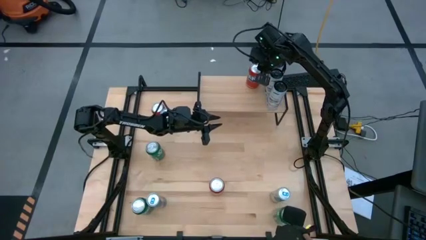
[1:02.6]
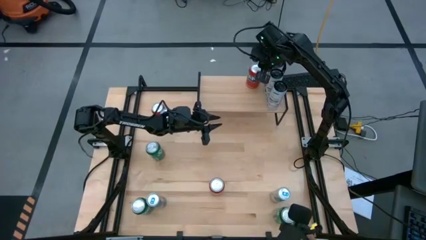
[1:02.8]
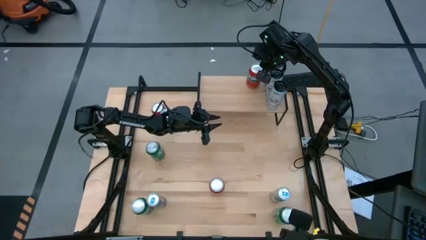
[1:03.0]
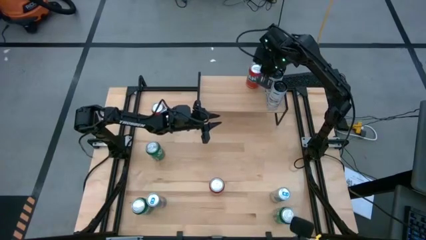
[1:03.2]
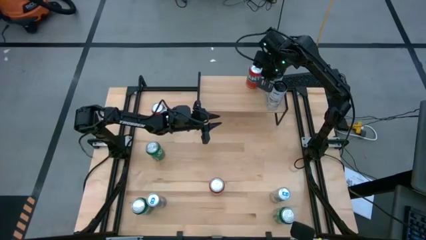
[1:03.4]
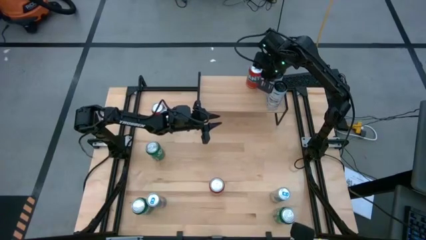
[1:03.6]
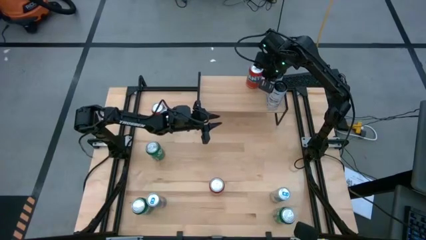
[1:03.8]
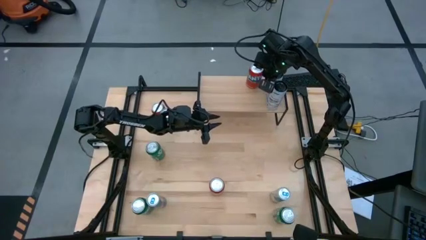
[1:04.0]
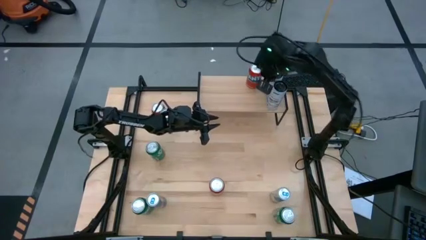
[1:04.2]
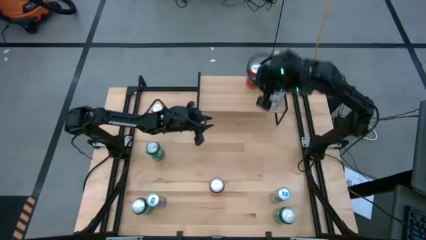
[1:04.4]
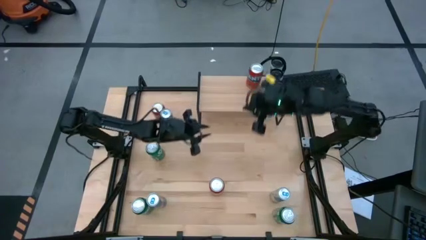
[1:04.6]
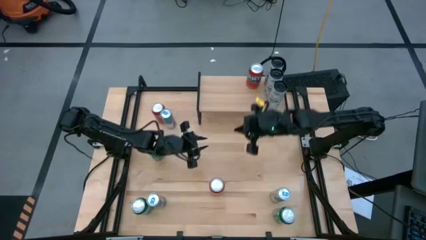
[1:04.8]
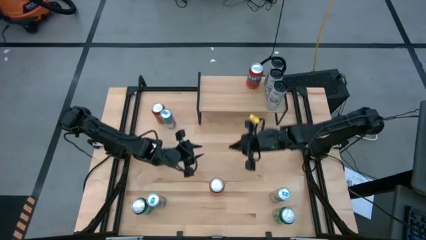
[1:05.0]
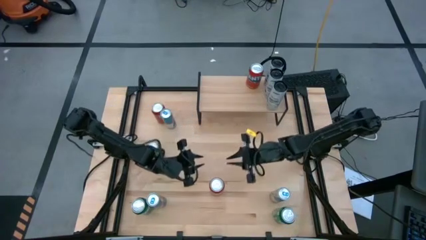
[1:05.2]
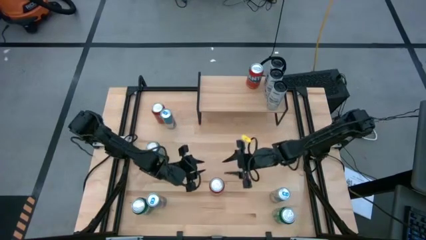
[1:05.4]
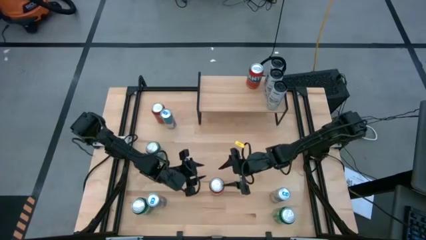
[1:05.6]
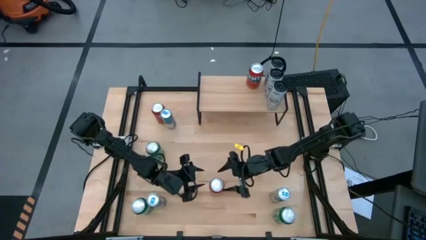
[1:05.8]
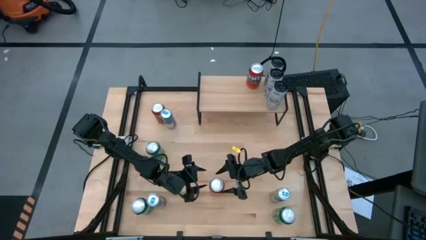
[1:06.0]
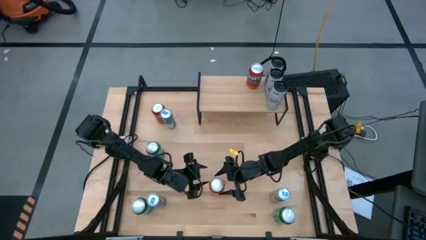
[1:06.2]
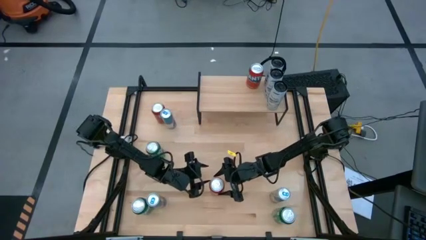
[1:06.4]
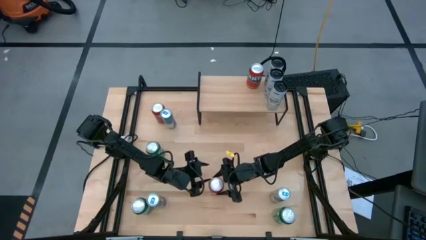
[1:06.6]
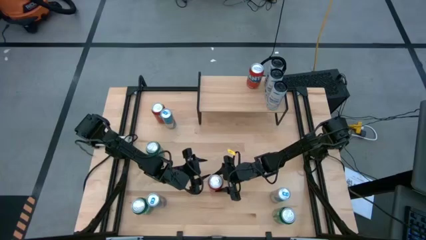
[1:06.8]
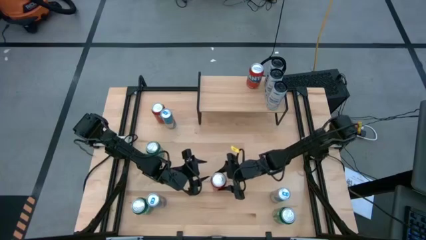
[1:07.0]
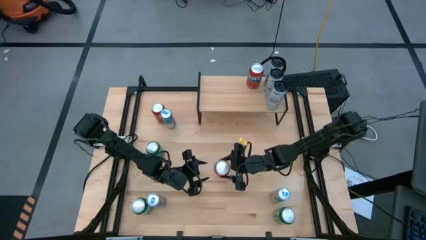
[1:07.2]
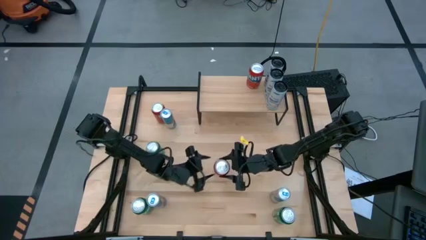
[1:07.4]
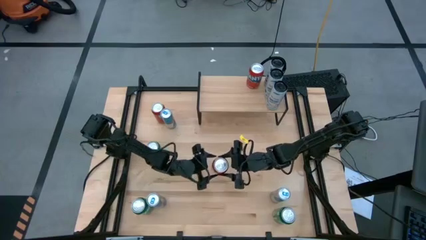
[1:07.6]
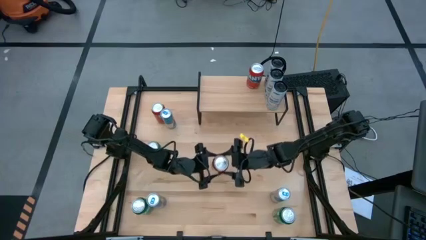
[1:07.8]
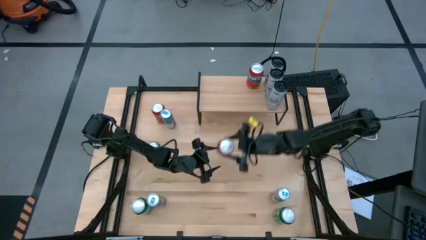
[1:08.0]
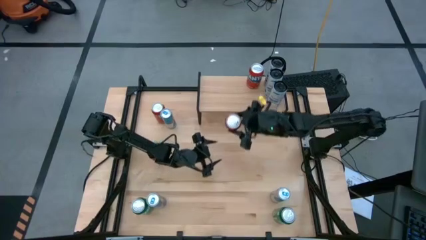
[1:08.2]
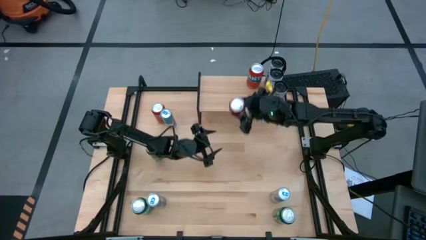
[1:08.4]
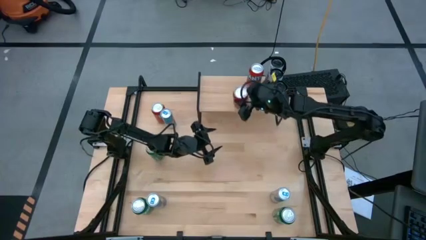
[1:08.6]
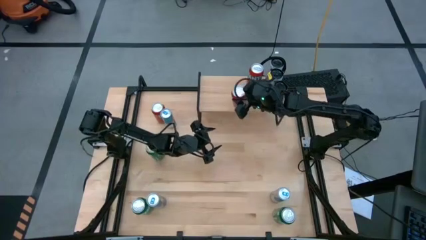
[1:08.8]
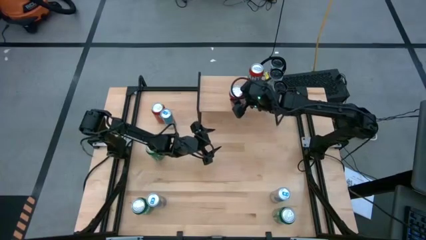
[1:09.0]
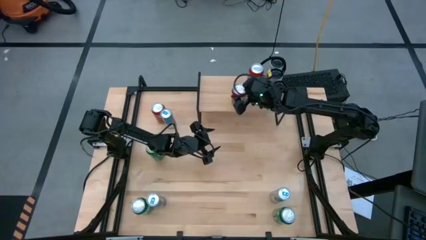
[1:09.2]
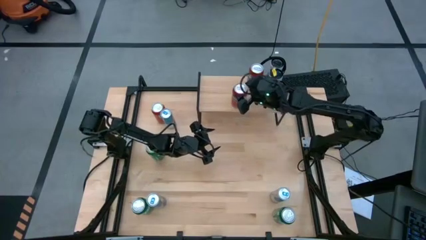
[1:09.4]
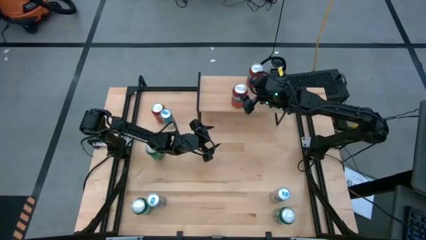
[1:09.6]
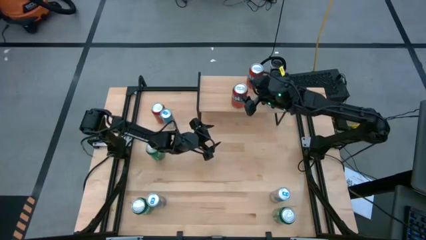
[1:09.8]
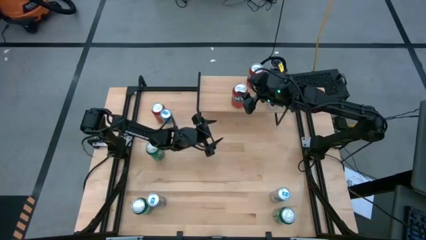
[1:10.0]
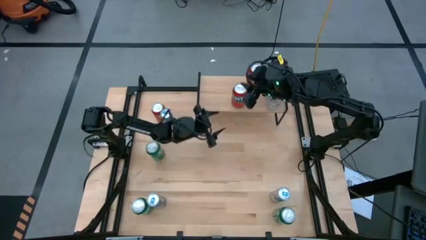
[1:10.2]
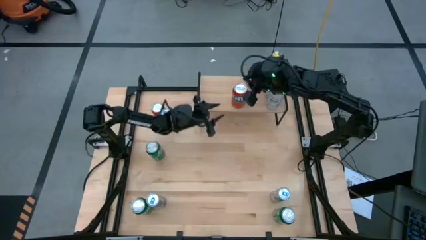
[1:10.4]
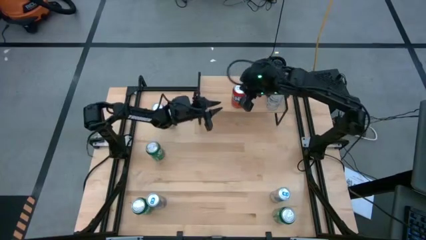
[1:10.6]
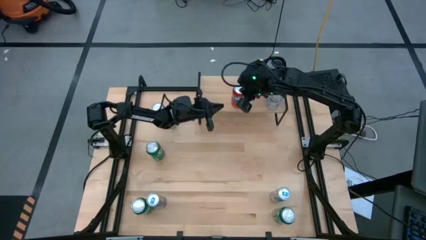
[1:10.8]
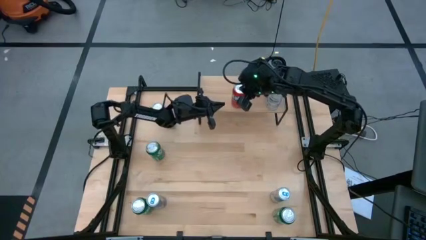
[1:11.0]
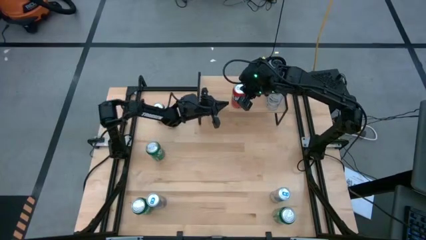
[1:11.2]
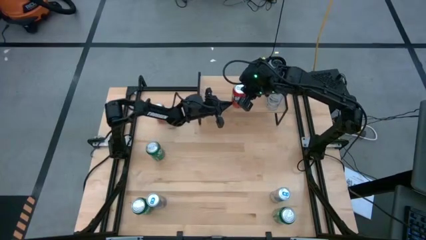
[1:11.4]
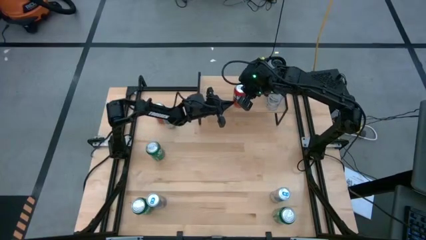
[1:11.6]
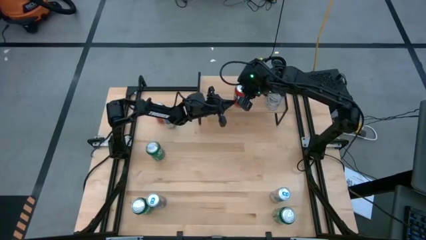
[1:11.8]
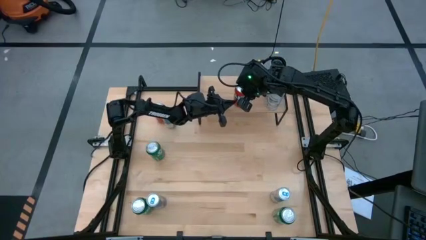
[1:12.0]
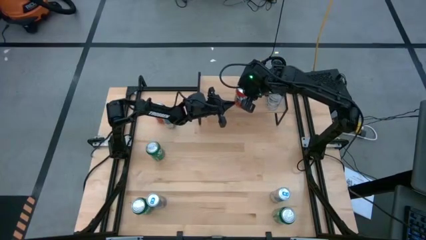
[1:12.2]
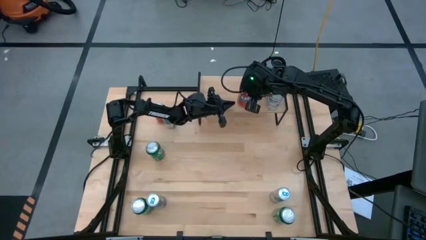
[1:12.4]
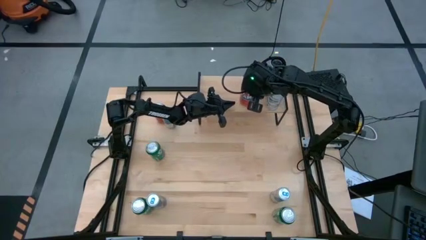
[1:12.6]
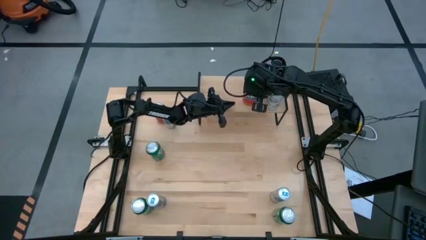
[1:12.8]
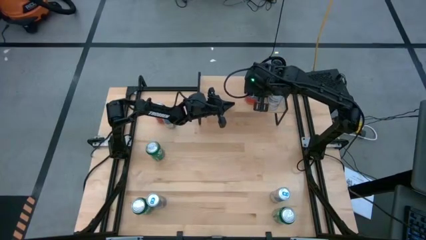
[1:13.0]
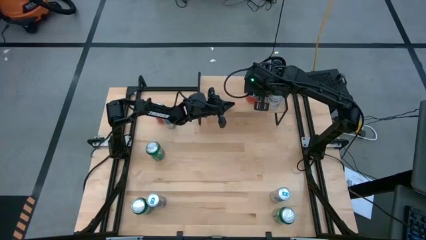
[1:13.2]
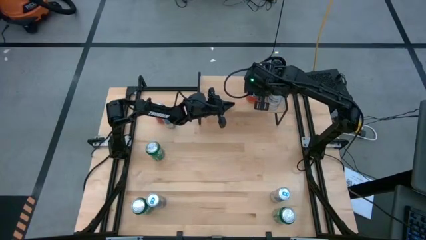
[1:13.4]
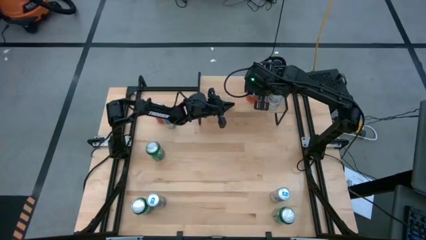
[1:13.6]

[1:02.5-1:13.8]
Task: Place canned beverage on shelf
Put the bottom red soda can on the shelf aligned with the other red soda can

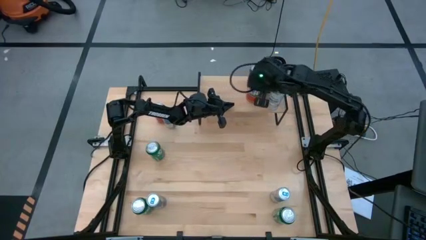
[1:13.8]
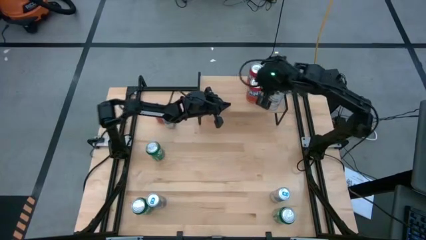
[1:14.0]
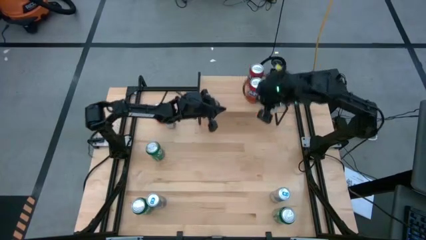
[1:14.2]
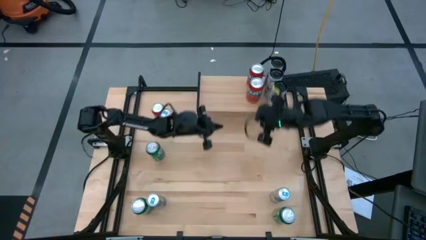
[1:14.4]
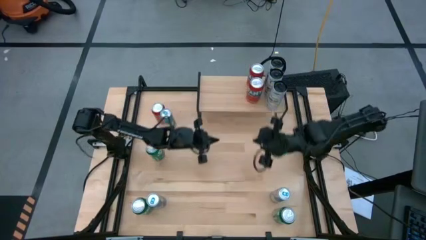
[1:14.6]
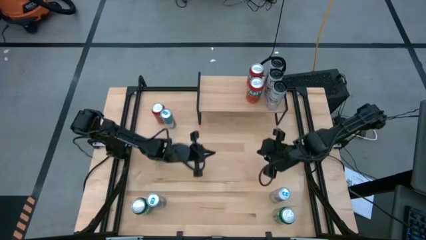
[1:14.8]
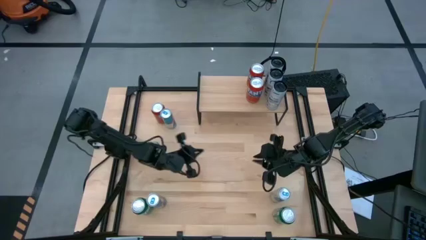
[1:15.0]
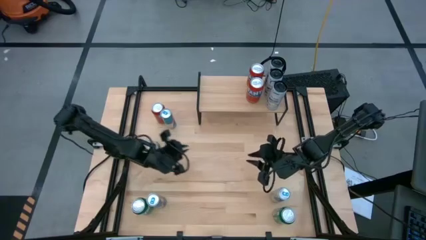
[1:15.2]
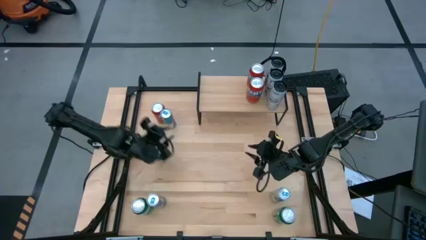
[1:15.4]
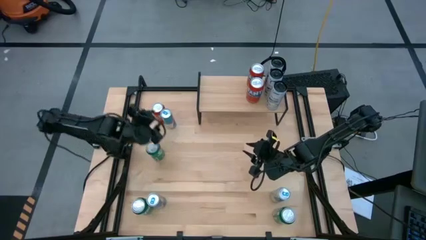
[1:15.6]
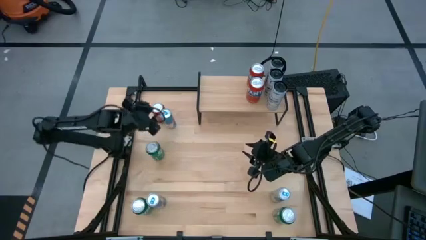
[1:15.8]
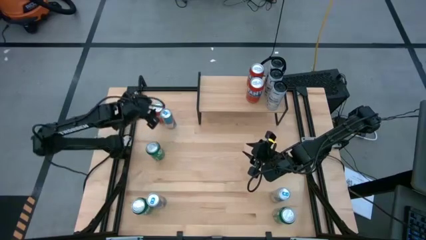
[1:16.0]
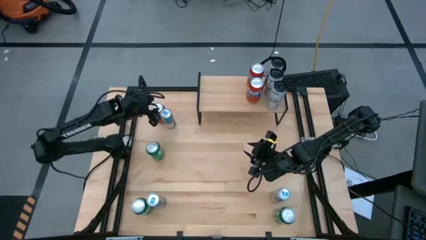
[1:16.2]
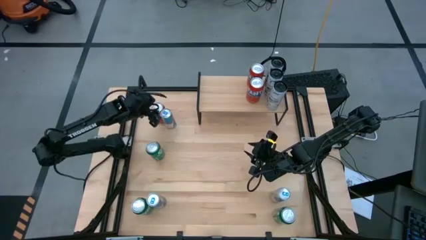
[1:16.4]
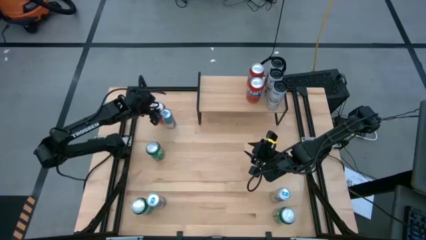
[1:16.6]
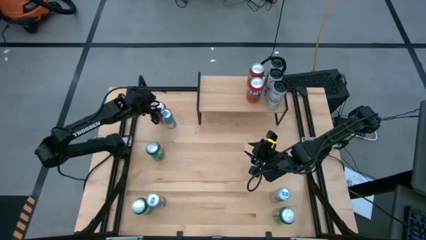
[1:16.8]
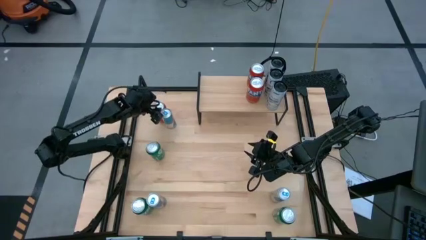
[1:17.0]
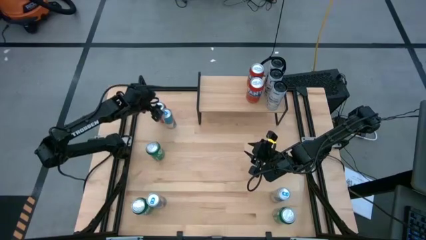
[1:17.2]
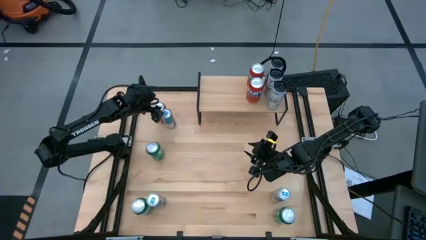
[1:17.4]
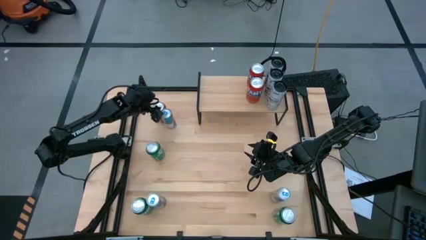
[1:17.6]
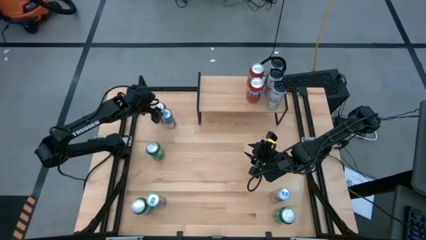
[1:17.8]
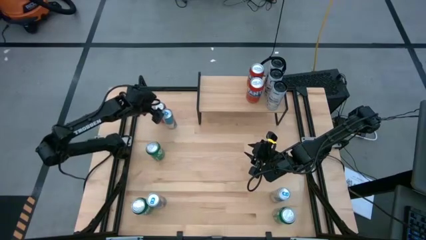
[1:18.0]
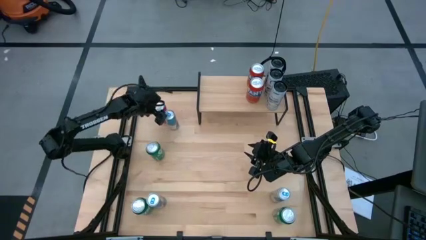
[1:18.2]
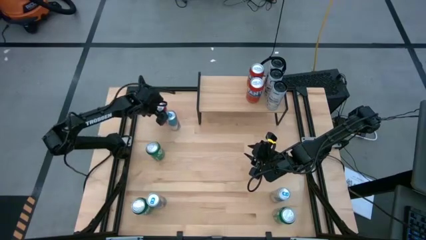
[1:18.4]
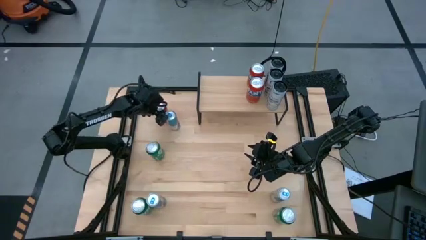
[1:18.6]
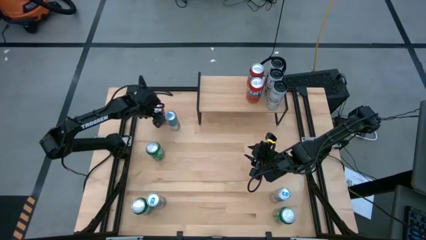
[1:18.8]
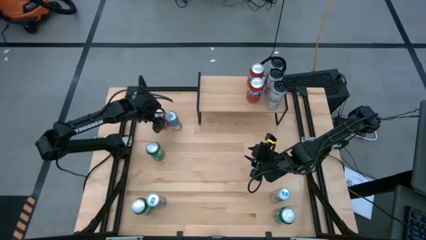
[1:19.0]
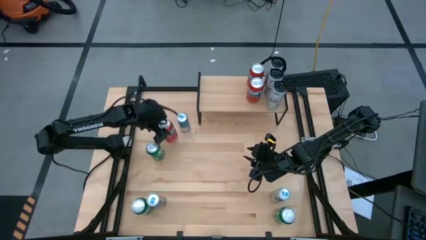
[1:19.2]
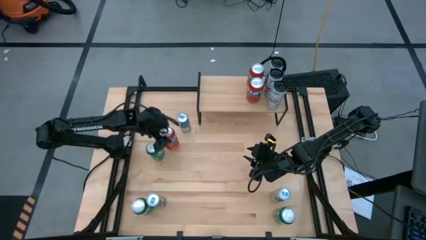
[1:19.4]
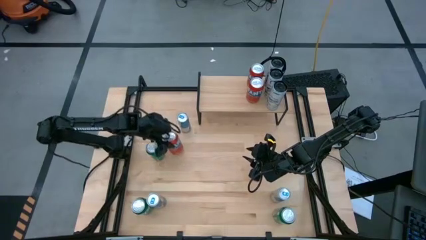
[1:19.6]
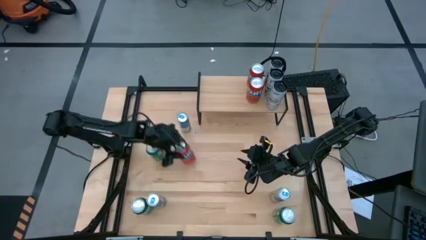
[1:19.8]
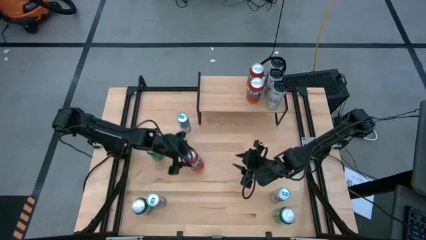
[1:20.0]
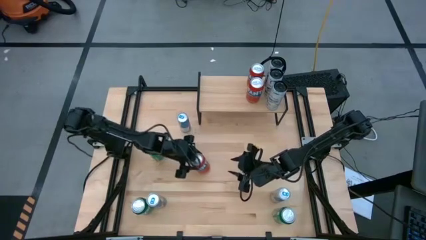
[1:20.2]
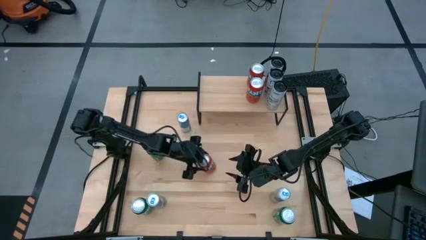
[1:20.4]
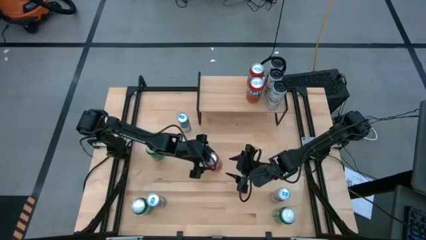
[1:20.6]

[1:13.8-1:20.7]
Put the red soda can on the shelf aligned with the other red soda cans
